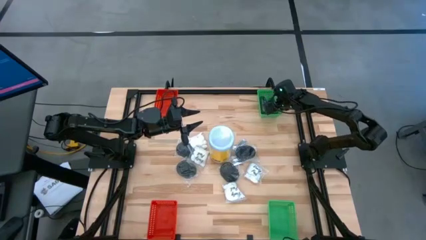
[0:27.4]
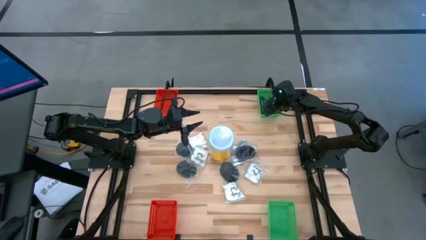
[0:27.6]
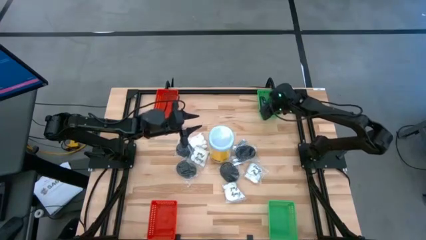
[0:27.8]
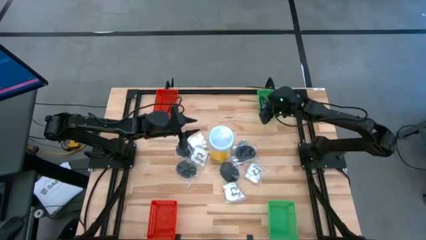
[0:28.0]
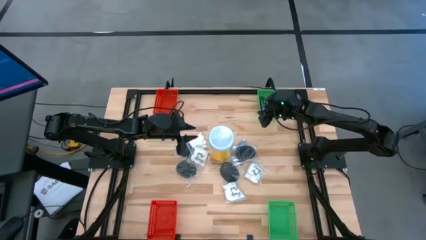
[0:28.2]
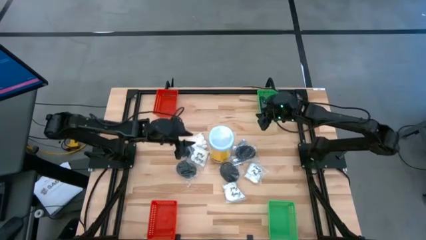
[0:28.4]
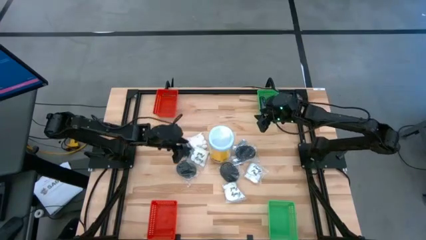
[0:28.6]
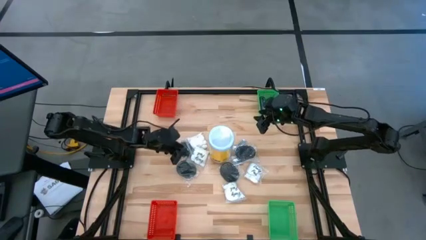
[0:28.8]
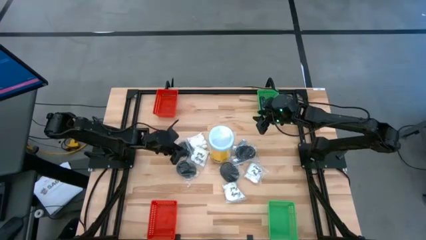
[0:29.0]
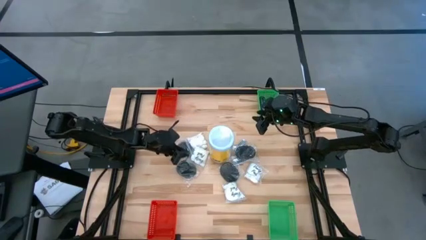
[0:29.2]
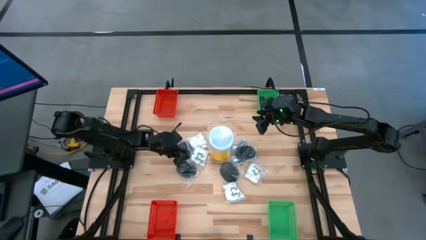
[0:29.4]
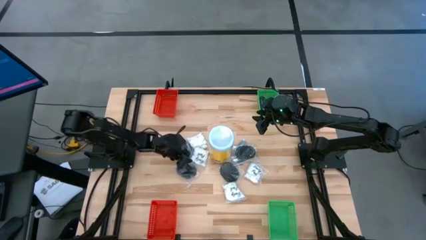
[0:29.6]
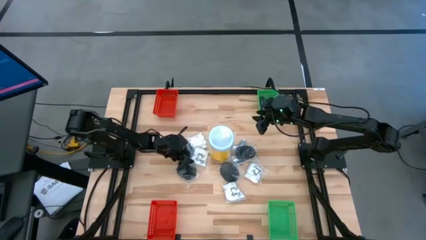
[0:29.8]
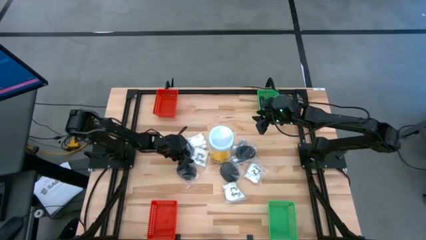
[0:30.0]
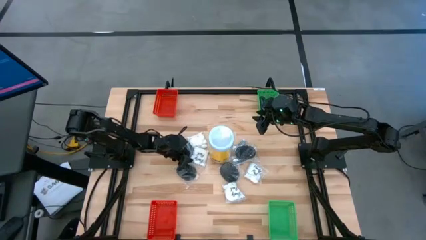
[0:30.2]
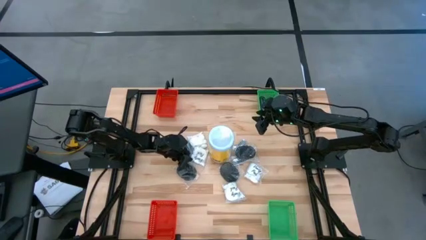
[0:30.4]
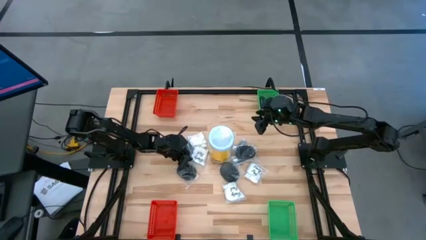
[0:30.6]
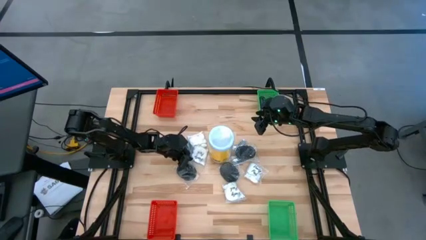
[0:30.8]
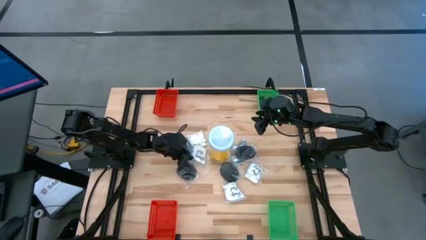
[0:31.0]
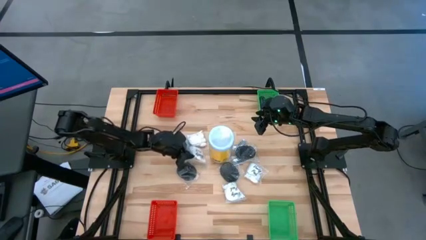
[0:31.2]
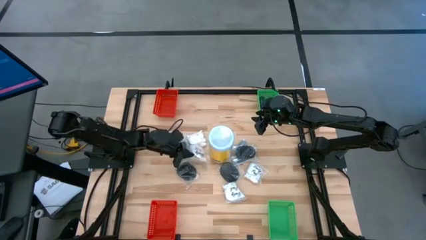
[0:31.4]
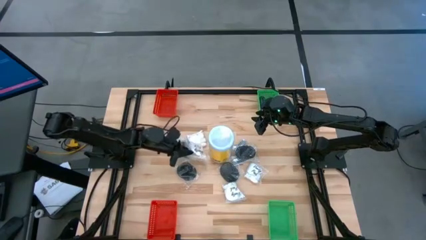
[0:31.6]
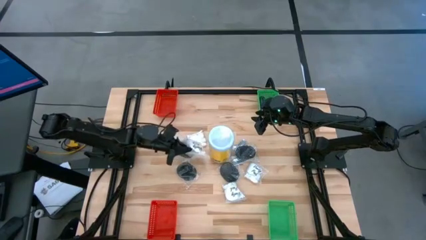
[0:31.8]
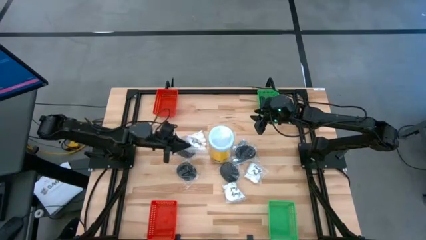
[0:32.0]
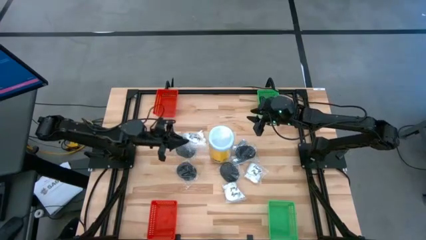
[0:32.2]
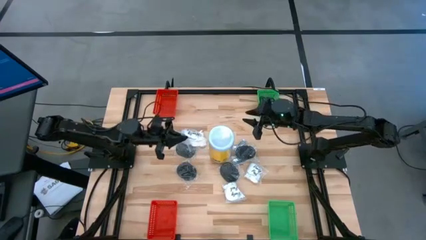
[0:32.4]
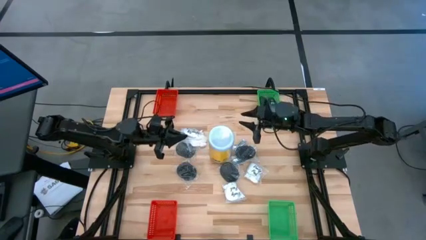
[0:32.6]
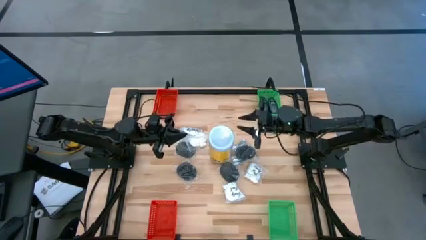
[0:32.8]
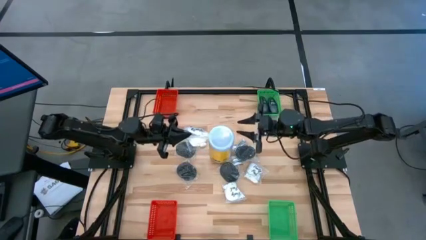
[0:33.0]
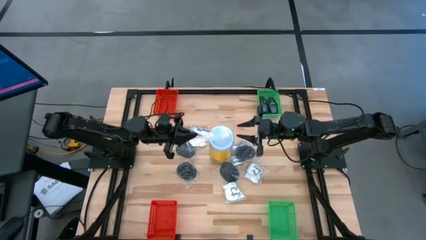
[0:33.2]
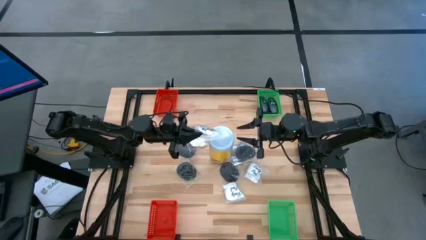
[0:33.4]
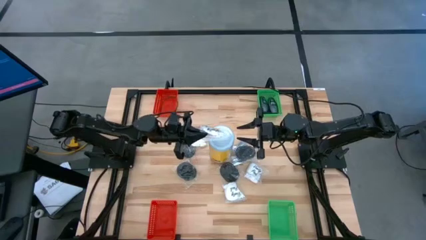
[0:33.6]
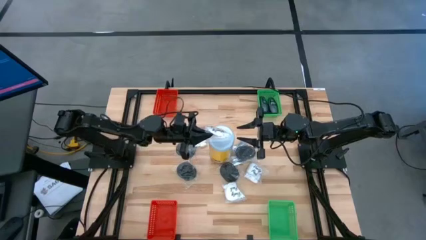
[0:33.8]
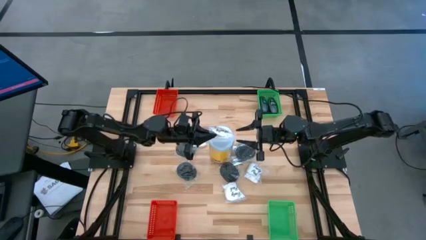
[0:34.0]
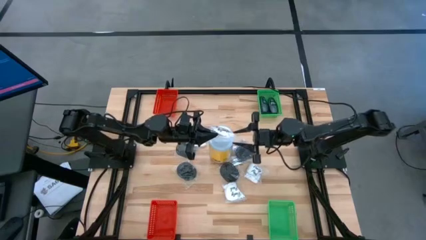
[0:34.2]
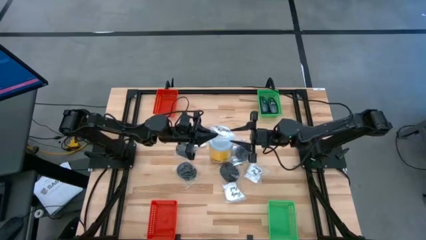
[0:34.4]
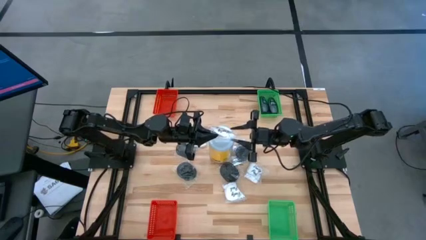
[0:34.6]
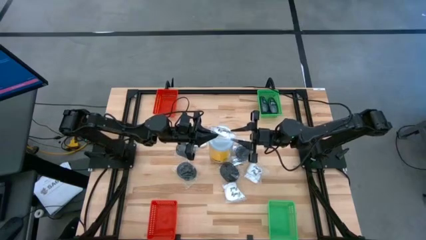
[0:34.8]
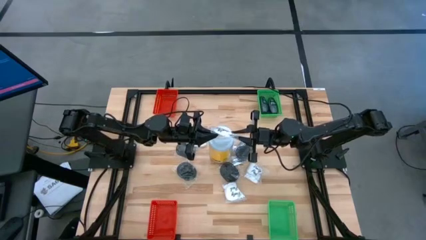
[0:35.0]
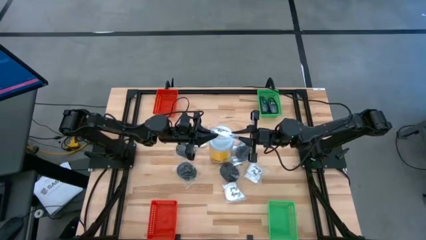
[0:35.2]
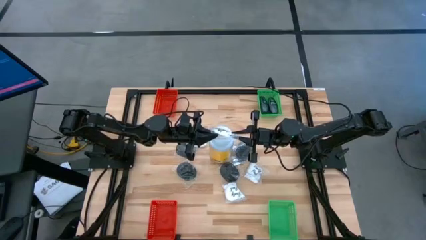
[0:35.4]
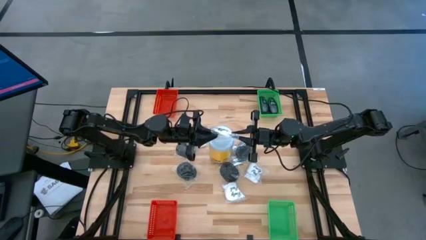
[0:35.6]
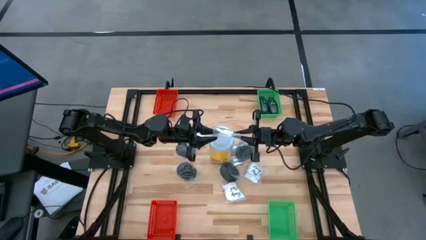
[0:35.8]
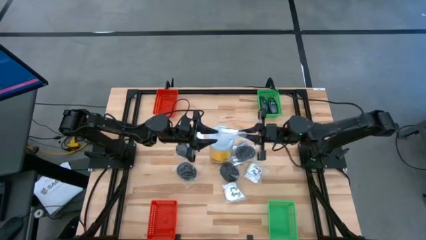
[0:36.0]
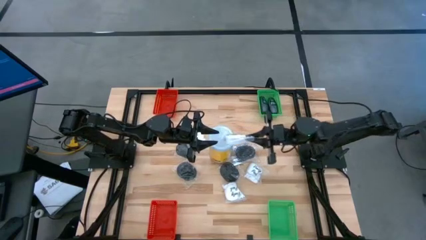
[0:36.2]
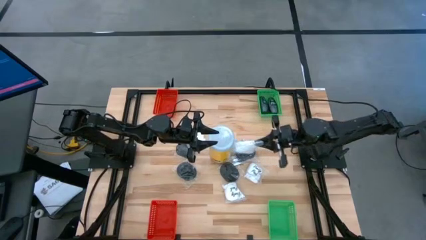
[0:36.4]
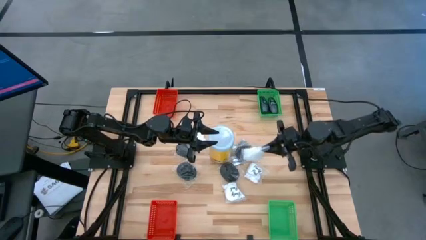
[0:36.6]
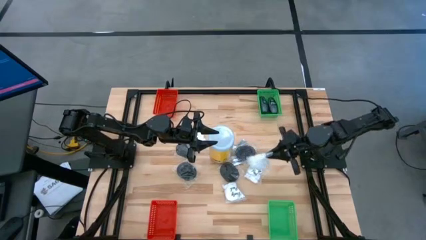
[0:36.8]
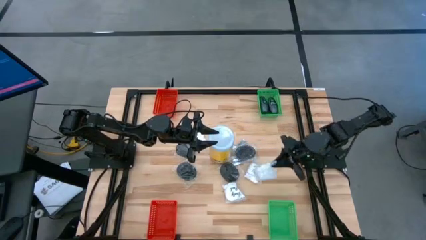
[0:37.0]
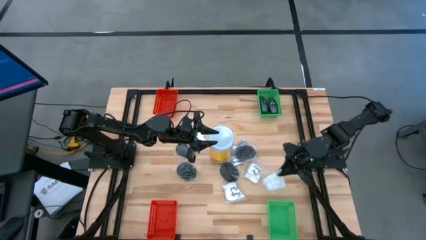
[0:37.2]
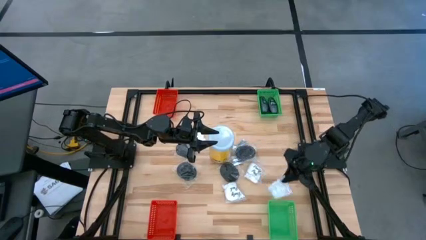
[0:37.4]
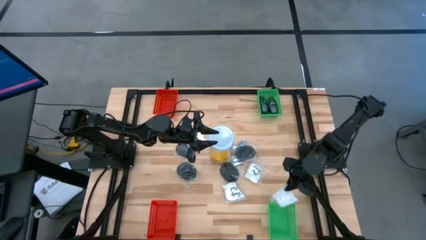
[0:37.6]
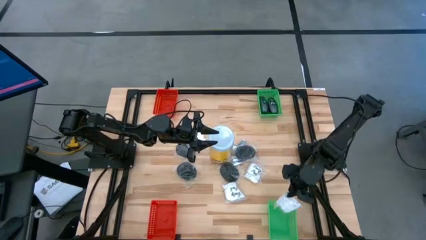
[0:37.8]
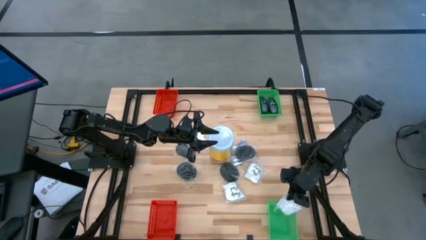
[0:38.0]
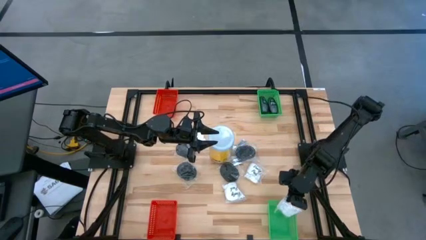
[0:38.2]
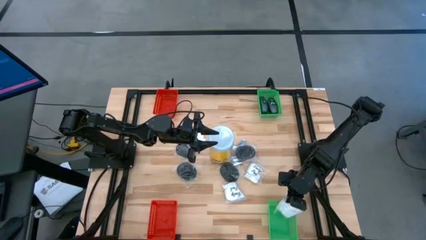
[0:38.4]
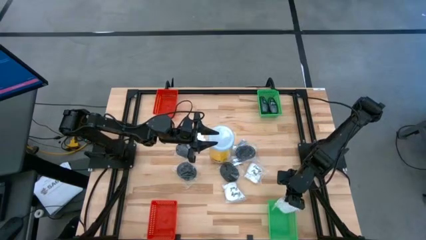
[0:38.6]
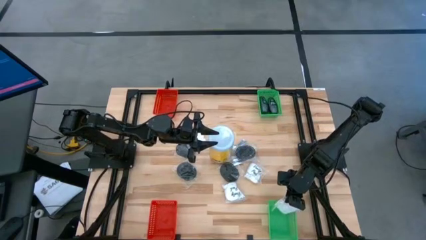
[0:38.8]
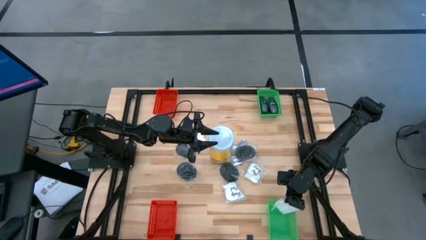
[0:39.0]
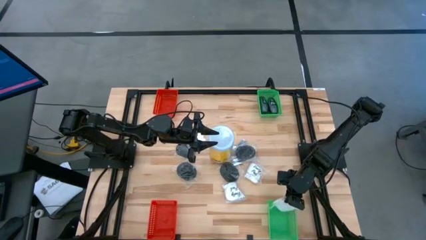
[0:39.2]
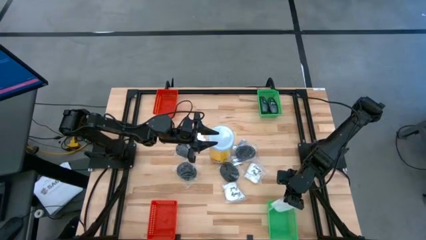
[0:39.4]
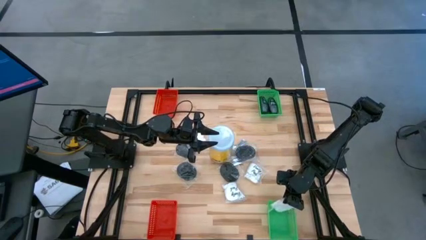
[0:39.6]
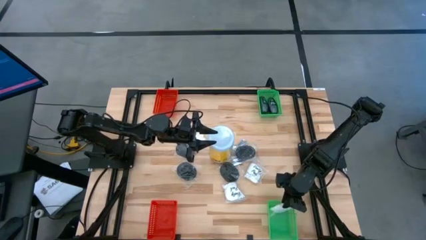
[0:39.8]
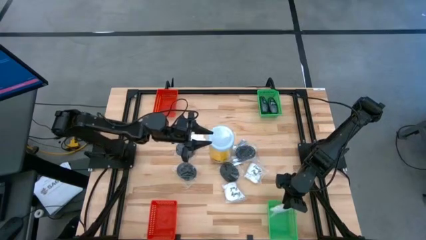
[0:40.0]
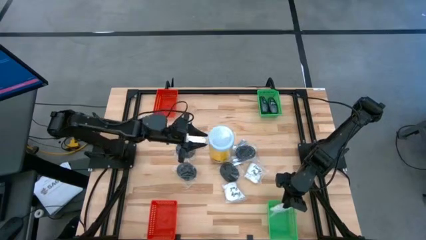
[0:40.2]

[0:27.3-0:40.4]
Task: Pick & Place Travel size toiletries
Put the white cotton pack into the bottom green bin

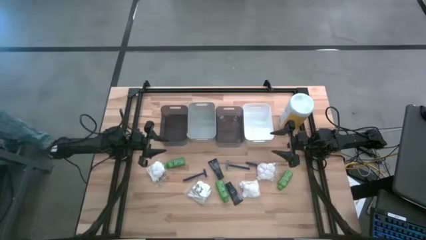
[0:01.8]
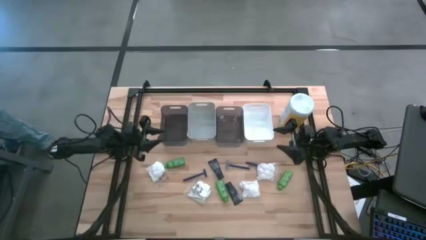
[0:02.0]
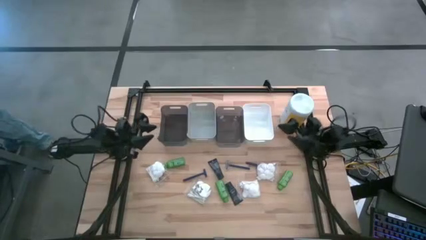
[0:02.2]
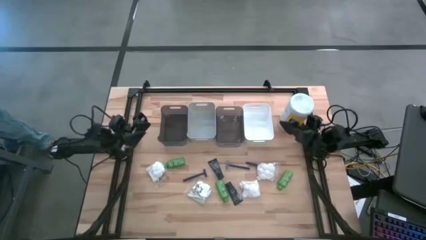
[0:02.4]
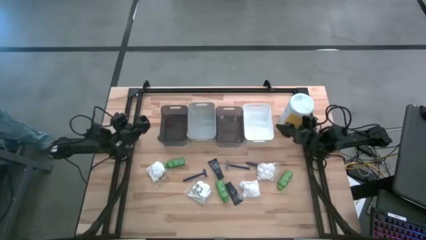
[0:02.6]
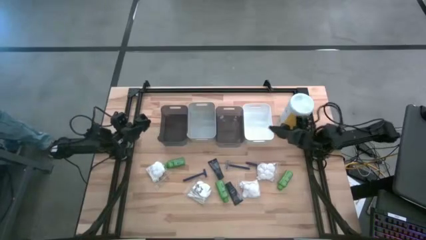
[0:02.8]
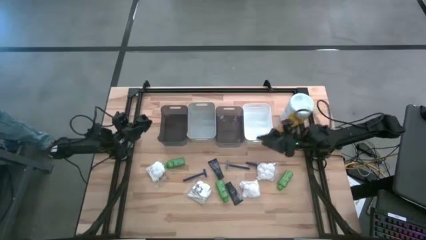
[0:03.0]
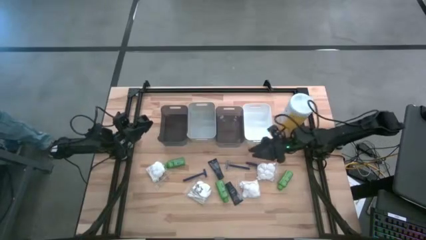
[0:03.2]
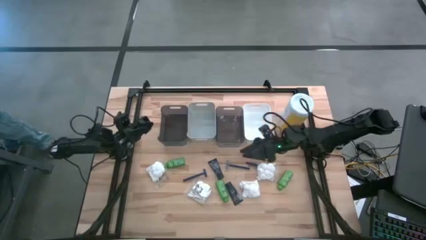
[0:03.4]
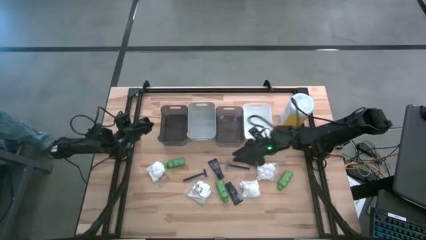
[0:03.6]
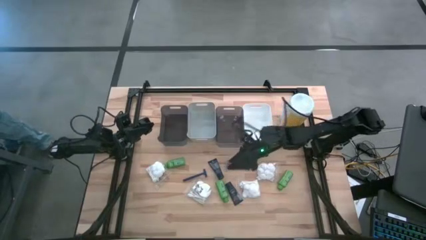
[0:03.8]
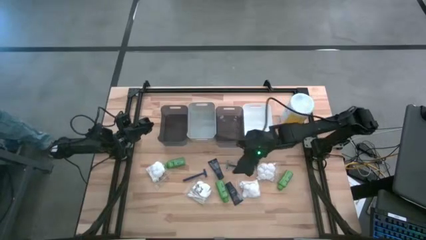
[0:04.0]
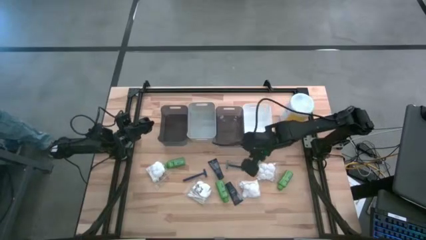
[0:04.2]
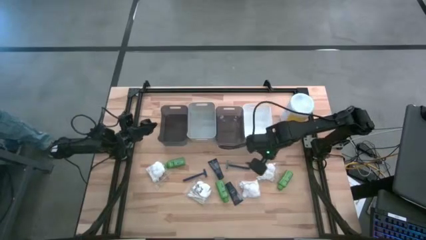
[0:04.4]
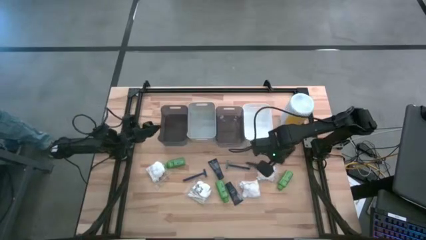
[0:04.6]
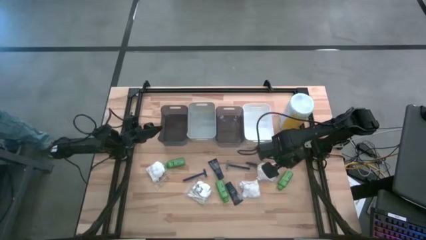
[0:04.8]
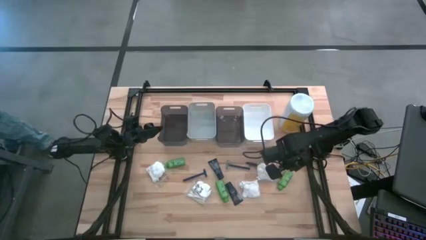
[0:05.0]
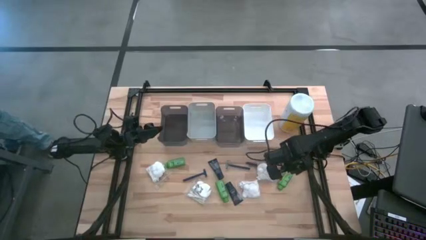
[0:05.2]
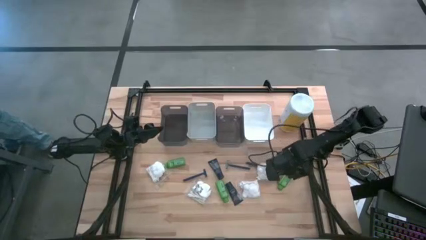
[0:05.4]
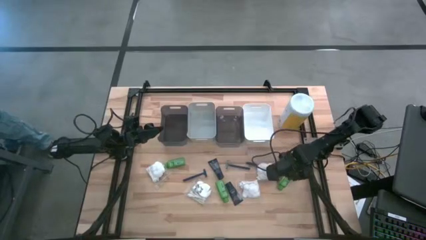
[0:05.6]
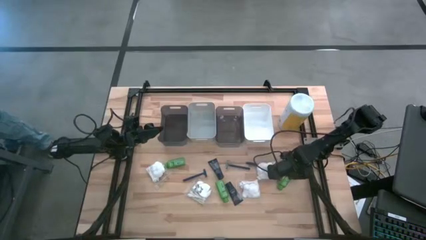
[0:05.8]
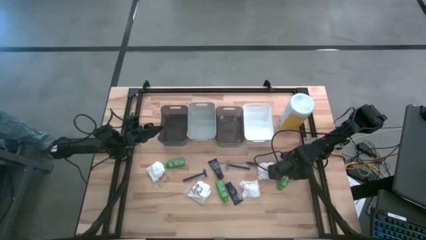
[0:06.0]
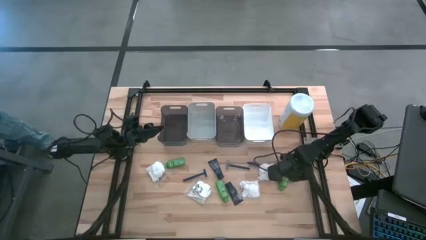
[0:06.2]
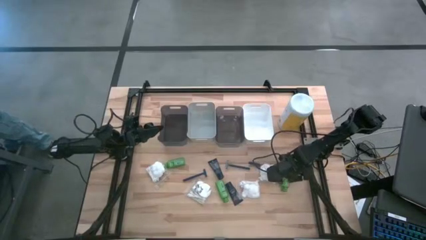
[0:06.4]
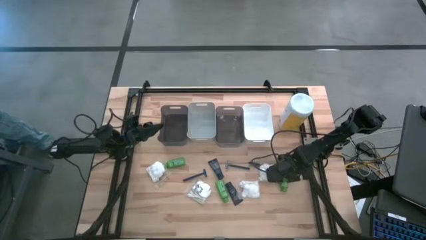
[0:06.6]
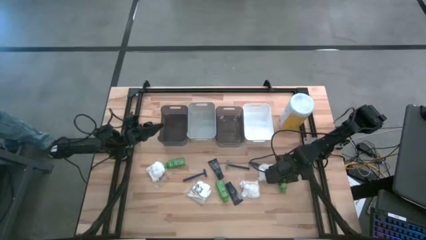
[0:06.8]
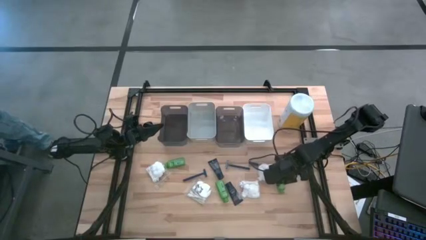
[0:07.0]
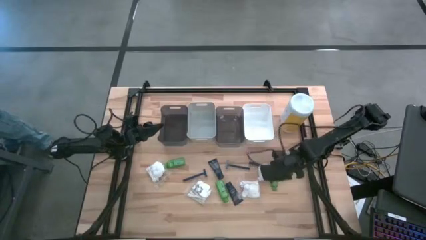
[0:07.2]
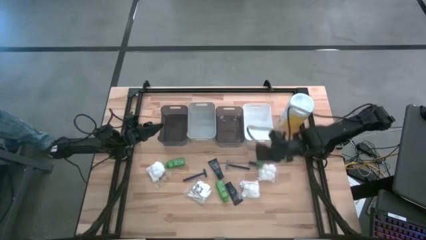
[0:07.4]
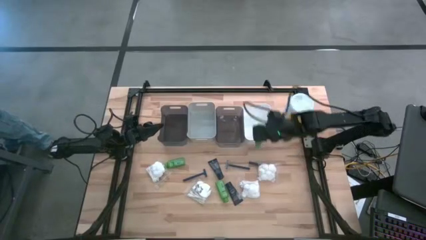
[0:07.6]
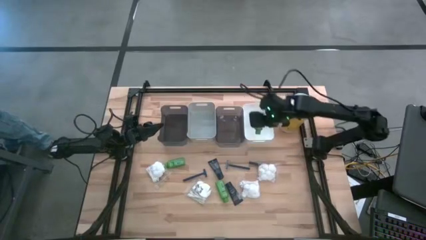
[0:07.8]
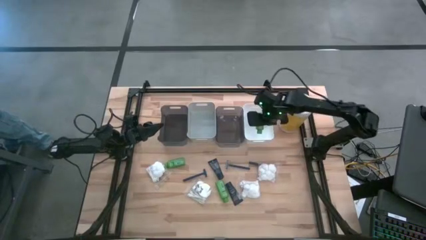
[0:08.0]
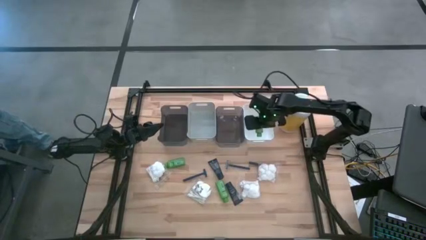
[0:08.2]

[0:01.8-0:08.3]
Task: Pick & Place Travel size toiletries
Put the green shampoo bottle into the white bin
